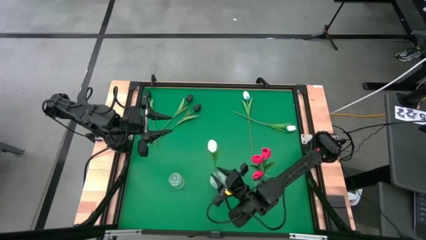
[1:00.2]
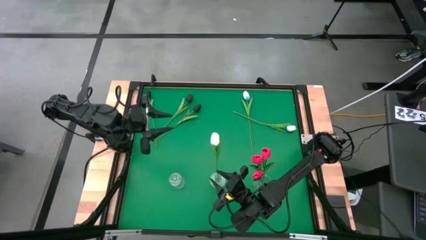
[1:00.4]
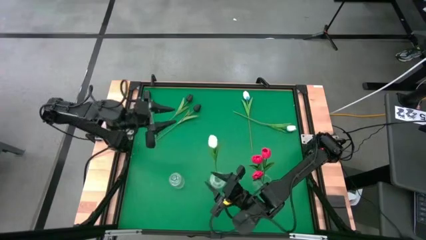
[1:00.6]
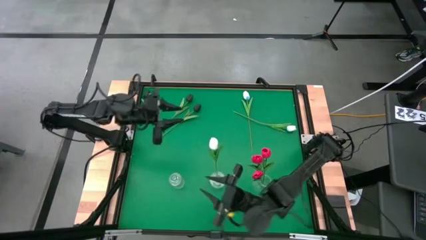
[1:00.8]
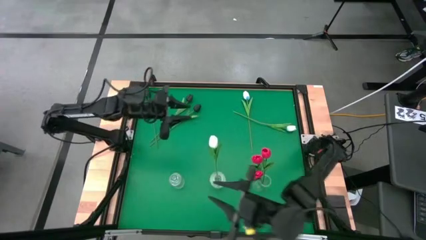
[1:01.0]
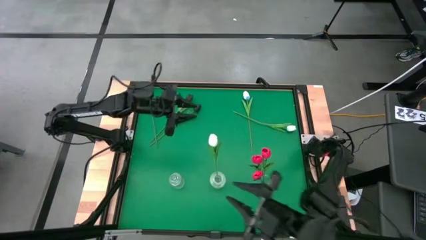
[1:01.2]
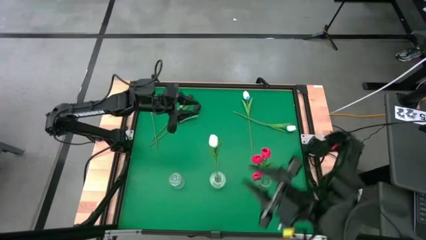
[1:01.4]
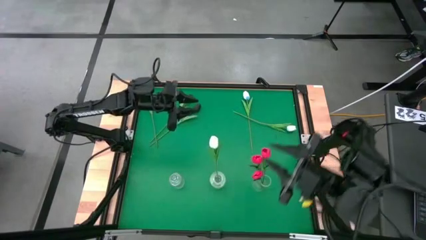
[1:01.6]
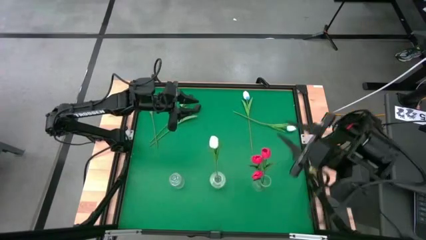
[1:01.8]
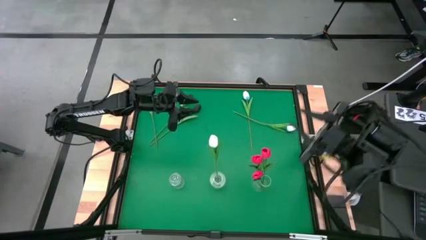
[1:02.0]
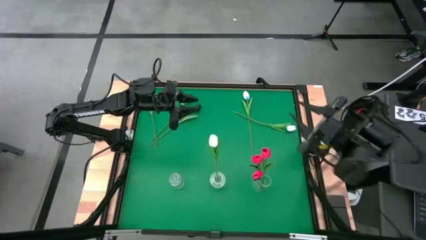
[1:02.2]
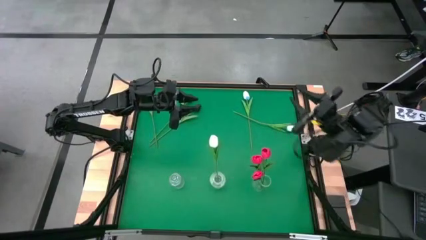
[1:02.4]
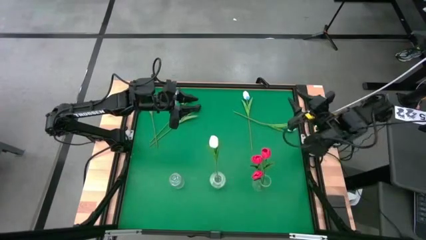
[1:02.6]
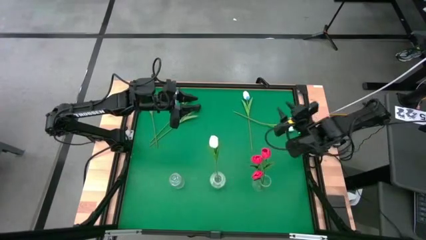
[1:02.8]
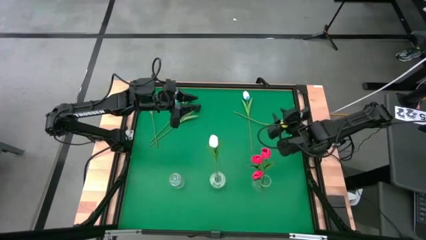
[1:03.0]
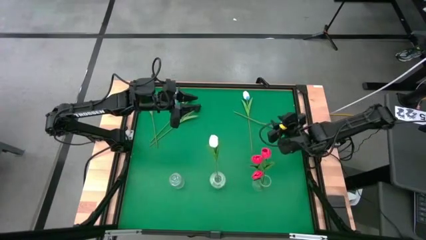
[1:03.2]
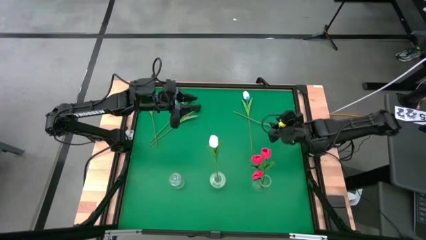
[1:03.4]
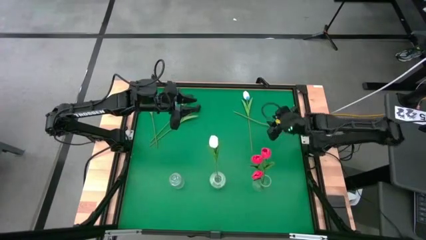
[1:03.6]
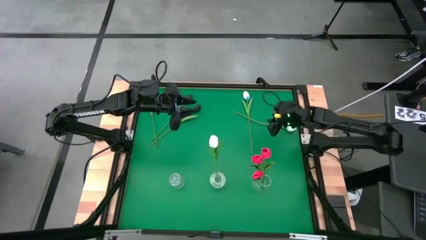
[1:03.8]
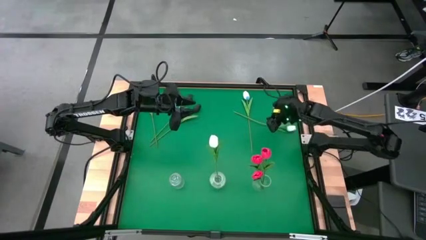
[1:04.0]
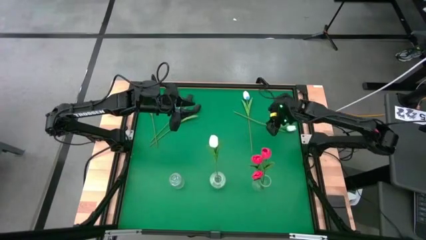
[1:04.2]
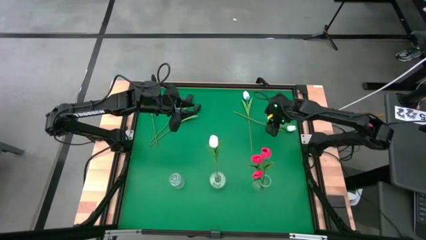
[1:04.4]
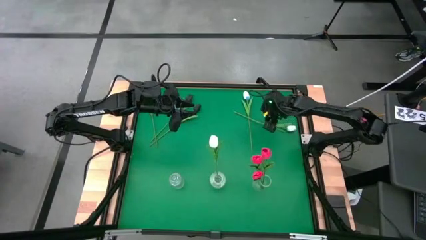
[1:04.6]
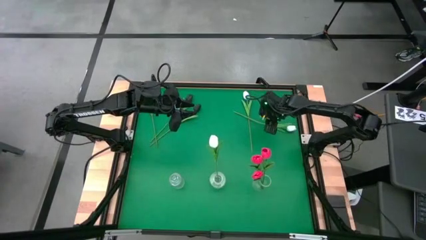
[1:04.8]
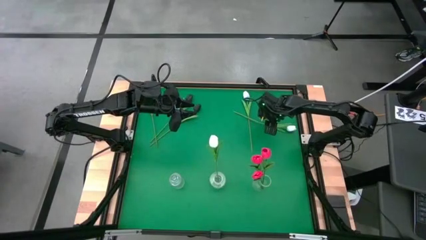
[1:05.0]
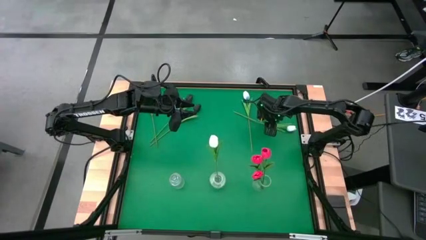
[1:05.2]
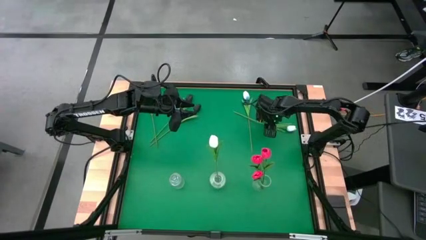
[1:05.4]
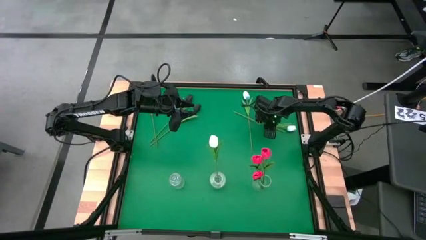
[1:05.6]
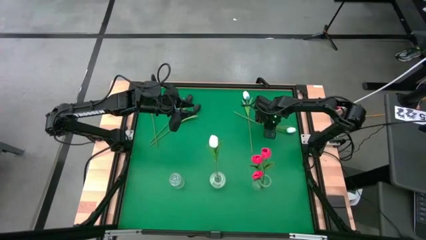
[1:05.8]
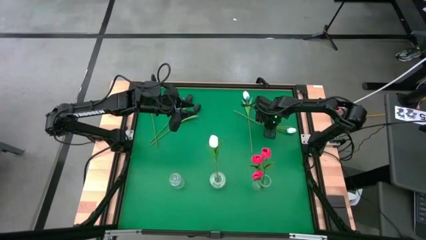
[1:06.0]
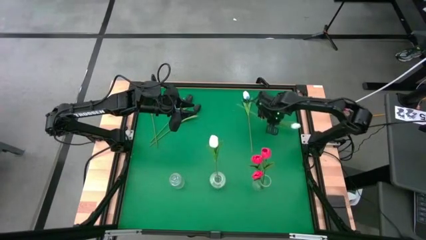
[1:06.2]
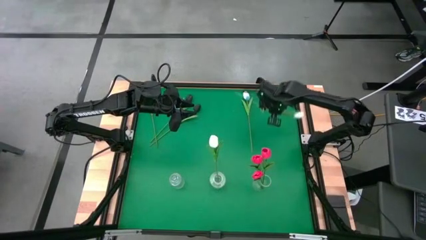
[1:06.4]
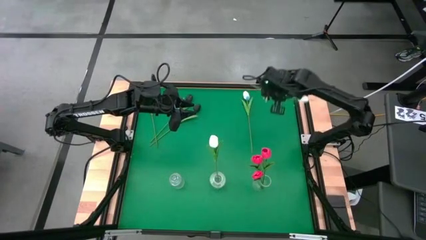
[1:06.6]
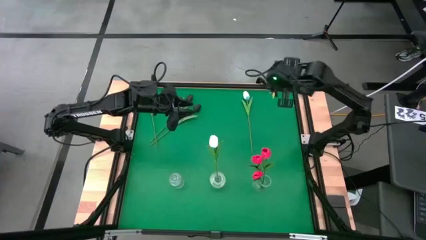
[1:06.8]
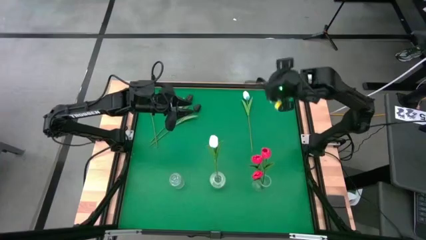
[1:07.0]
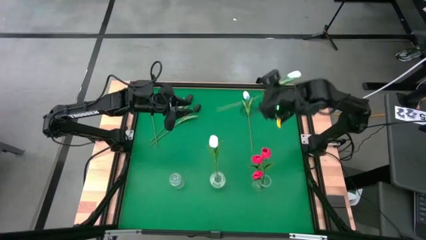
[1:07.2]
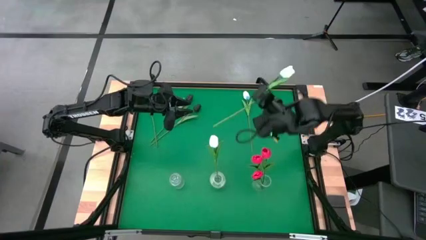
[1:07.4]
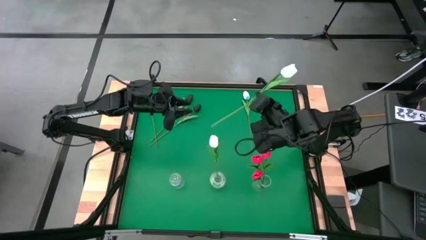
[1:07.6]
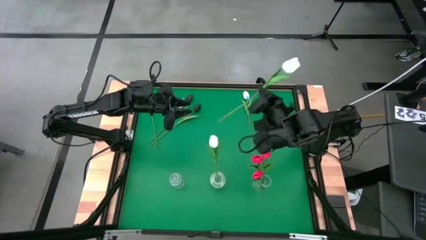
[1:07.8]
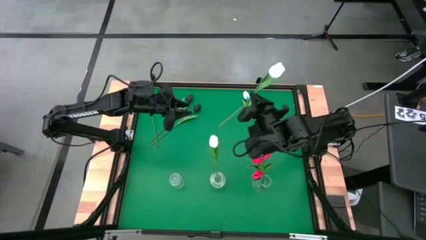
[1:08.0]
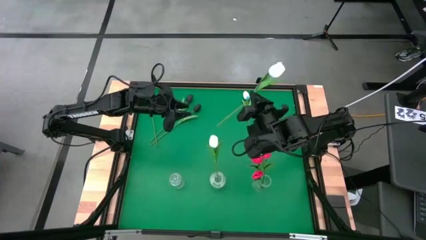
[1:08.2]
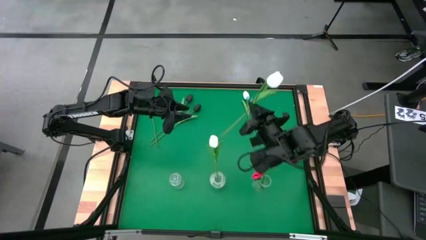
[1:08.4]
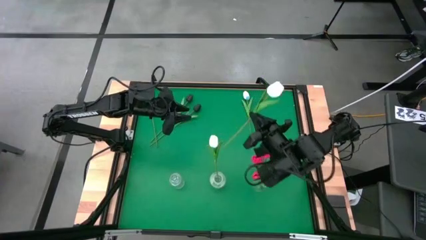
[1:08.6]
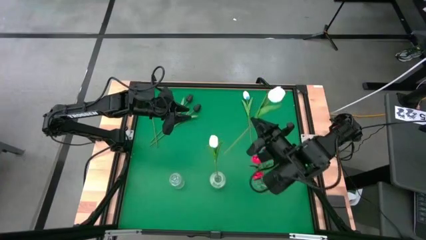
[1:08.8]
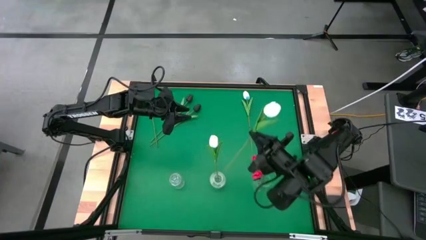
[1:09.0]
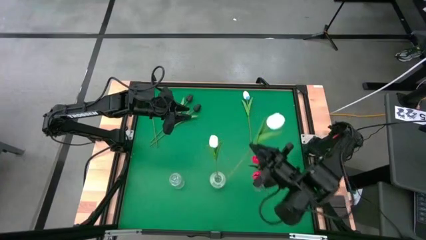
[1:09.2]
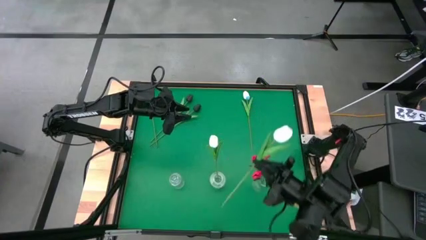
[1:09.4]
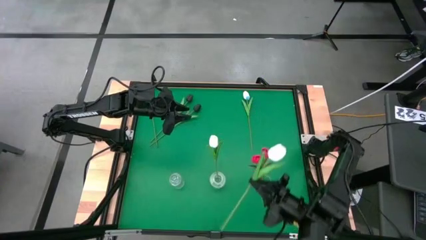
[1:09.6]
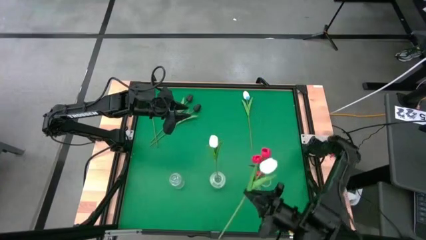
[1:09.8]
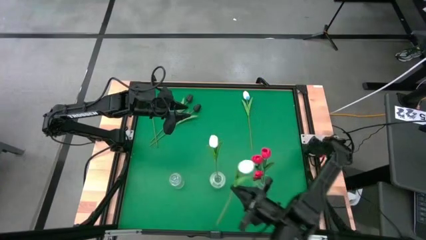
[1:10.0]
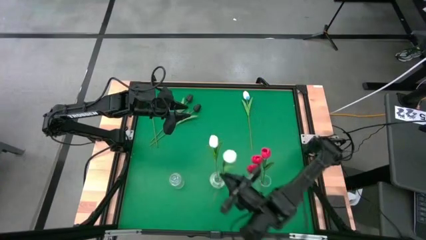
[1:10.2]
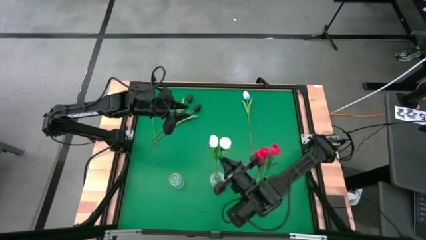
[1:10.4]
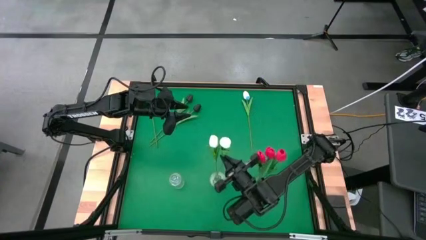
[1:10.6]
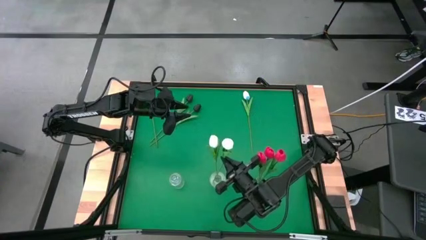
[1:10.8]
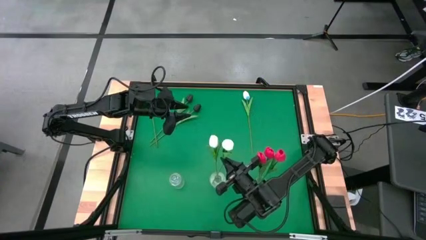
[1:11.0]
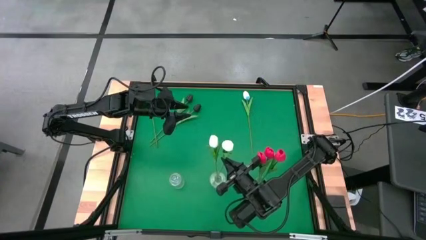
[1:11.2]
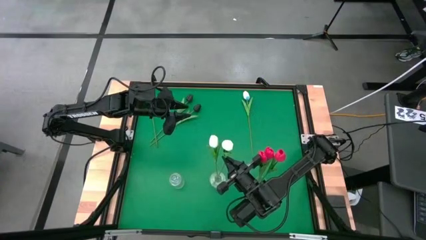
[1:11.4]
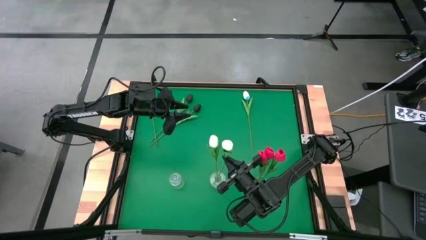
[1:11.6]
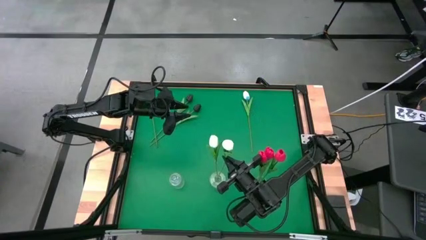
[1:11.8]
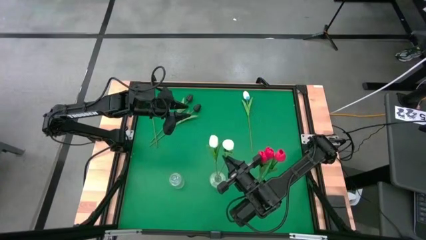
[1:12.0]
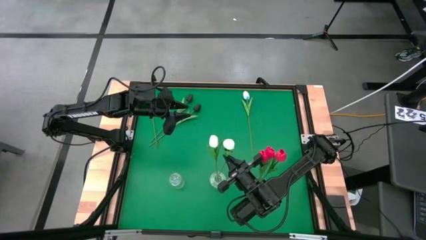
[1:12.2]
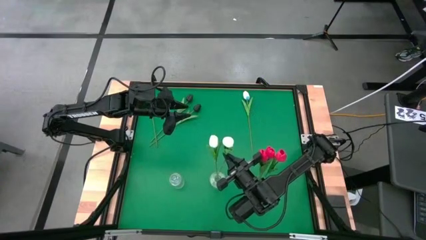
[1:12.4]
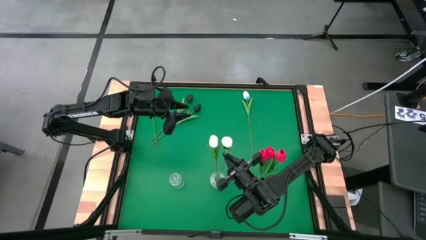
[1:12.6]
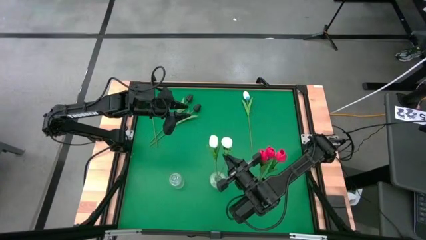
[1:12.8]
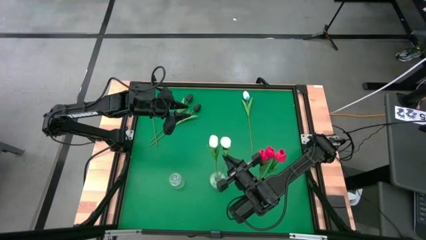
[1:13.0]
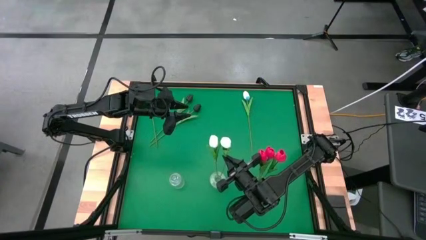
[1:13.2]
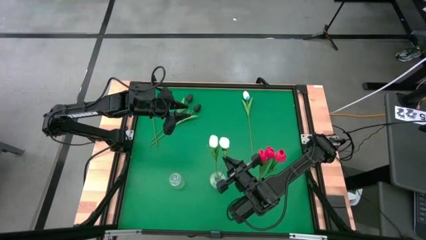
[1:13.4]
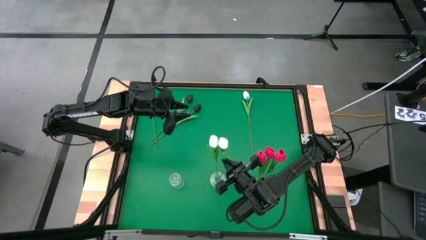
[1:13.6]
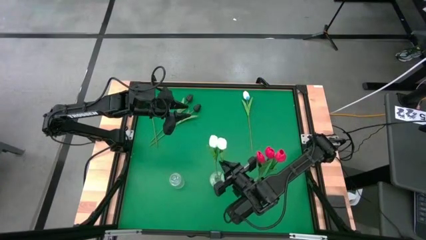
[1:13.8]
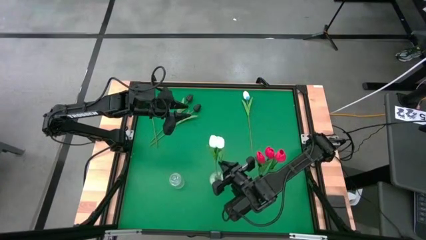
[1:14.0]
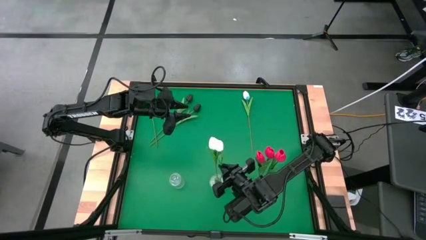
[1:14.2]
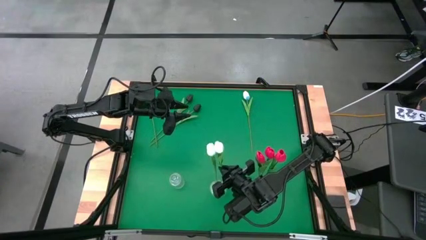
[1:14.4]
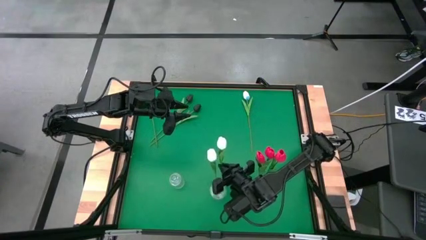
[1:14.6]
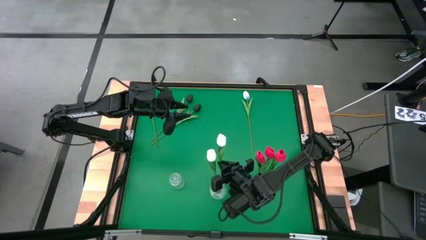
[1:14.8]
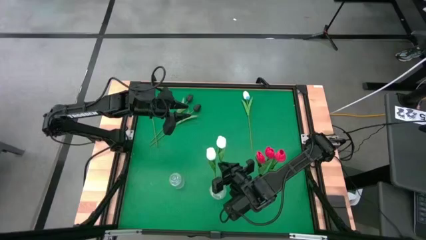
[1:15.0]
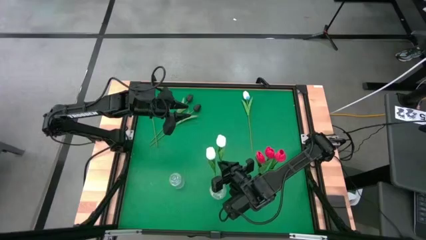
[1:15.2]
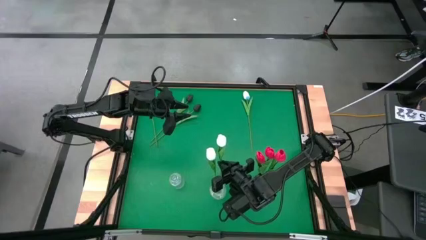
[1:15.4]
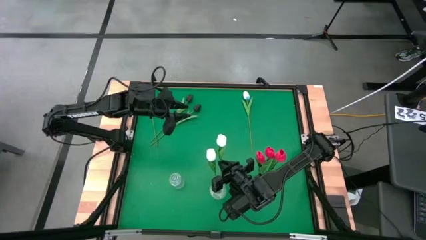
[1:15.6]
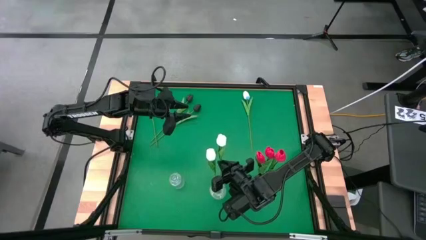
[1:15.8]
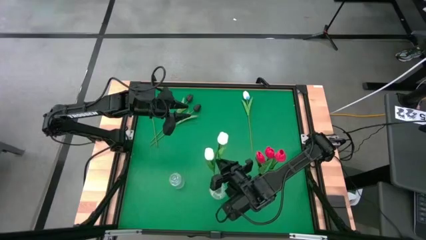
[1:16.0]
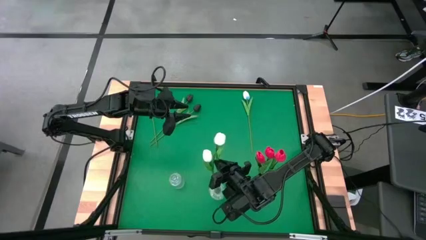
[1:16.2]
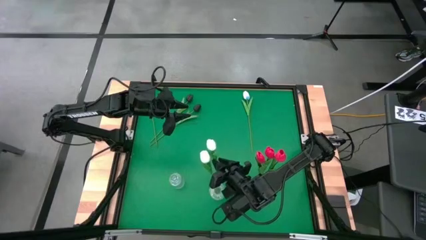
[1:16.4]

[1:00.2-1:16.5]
Task: Sort flowers into vase by color
Put the top white tulip into the middle transparent vase
